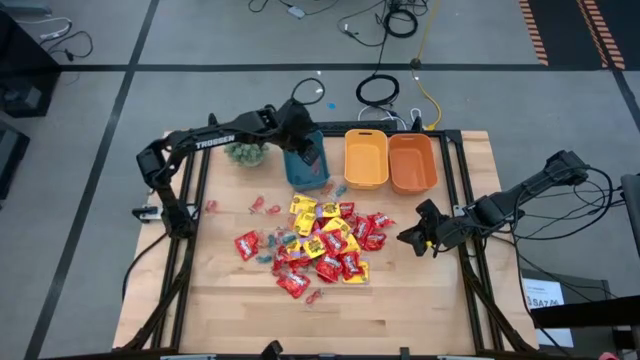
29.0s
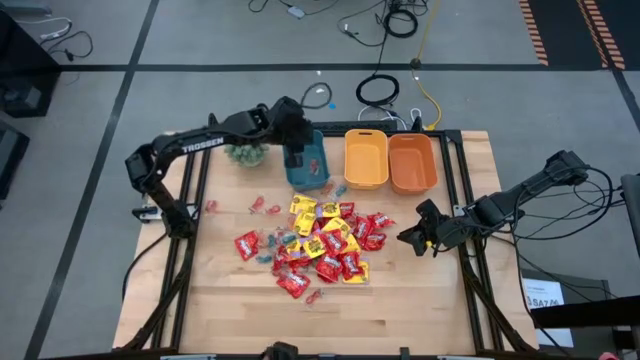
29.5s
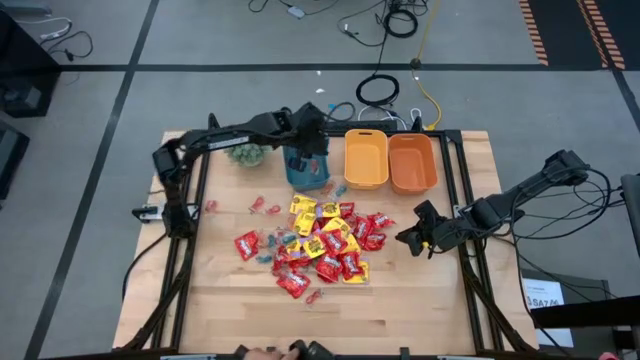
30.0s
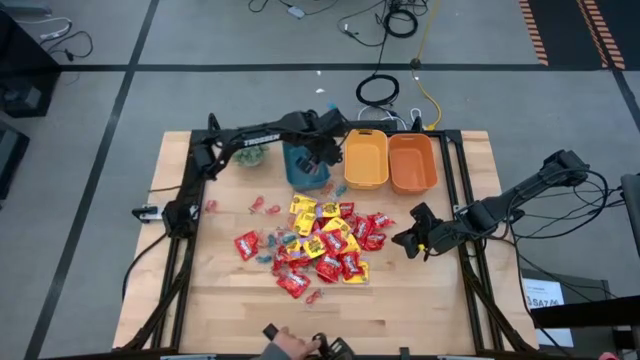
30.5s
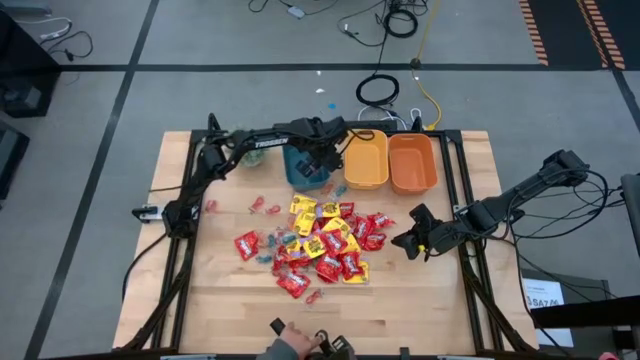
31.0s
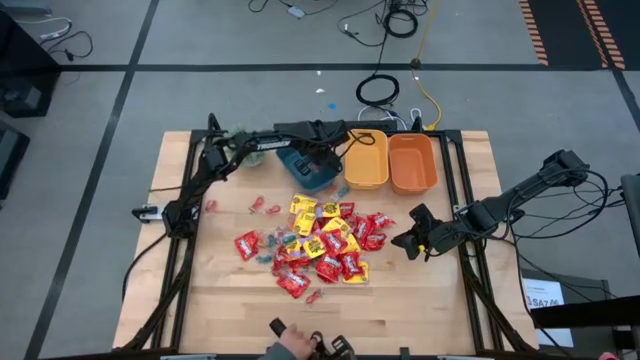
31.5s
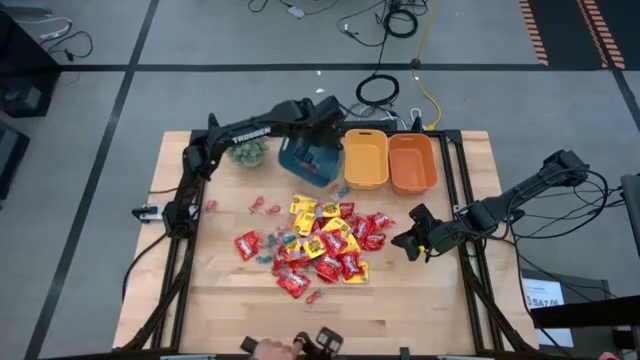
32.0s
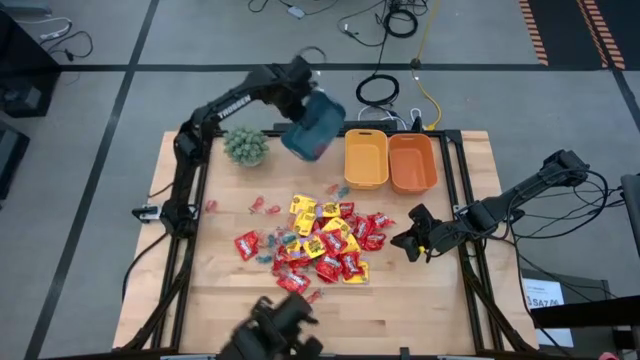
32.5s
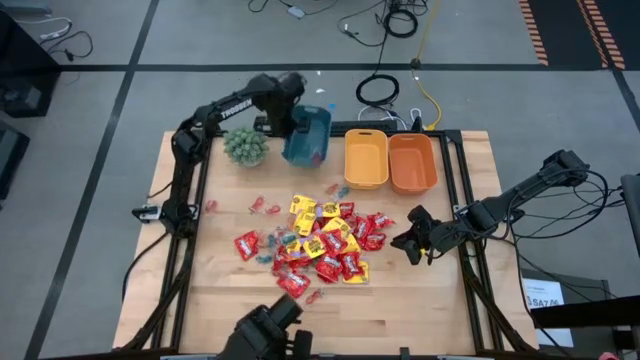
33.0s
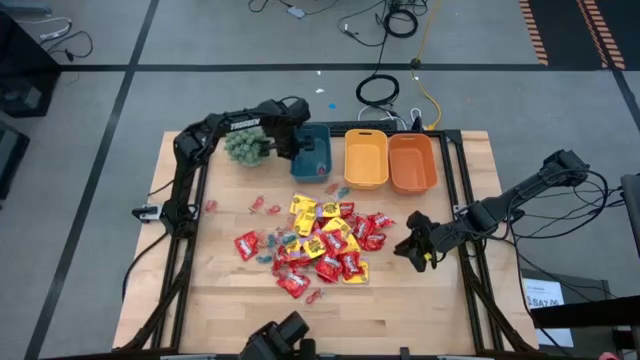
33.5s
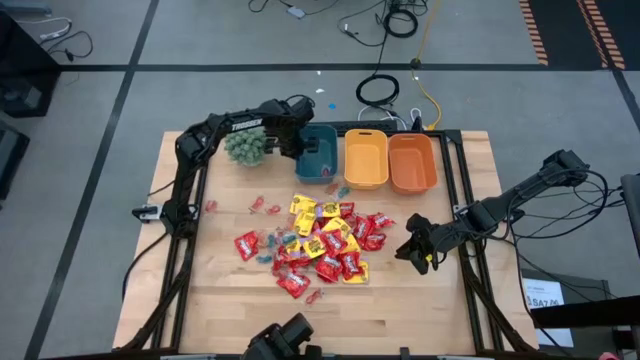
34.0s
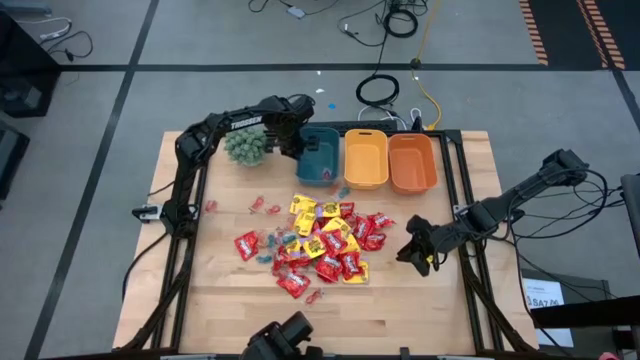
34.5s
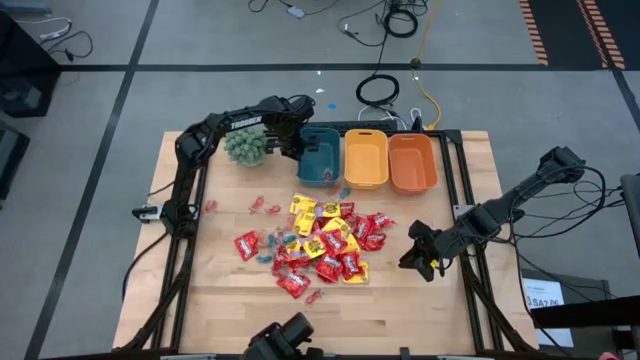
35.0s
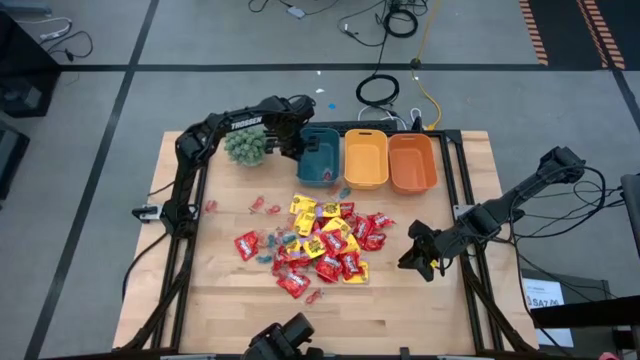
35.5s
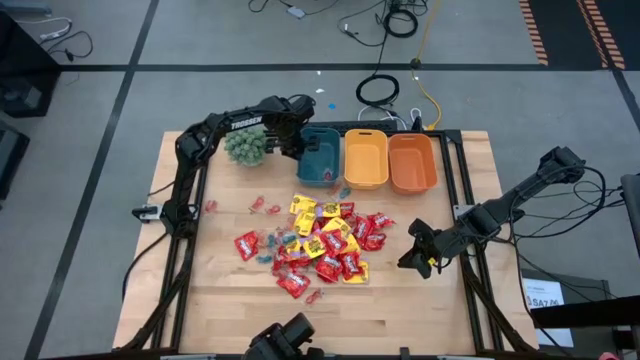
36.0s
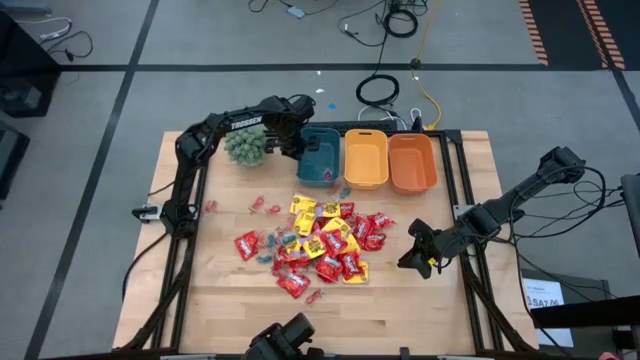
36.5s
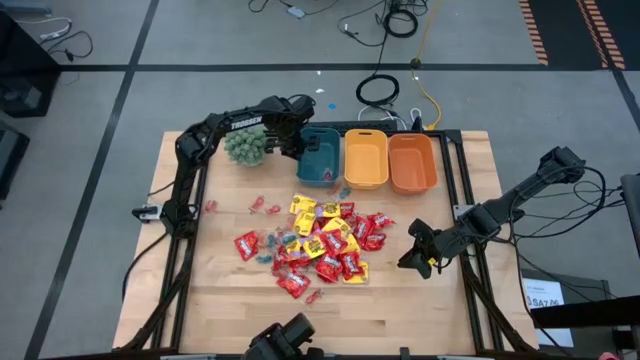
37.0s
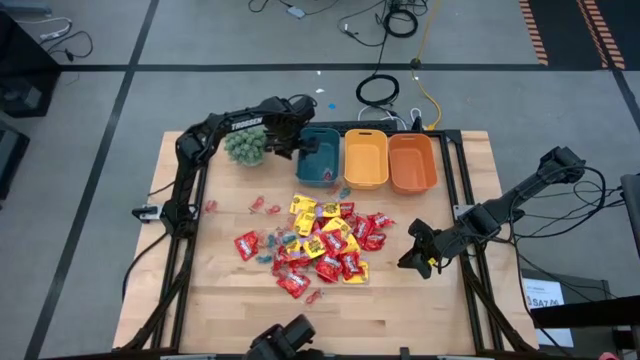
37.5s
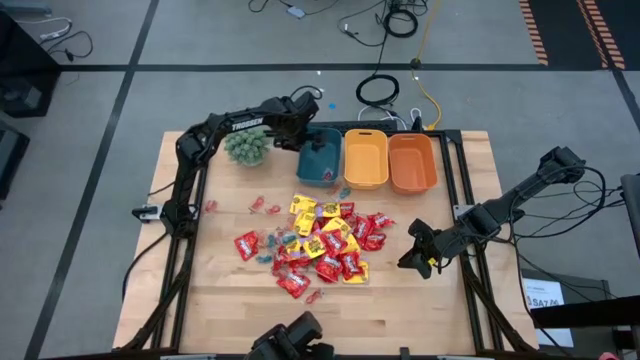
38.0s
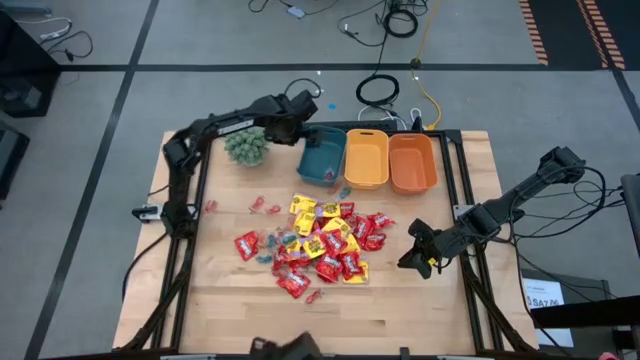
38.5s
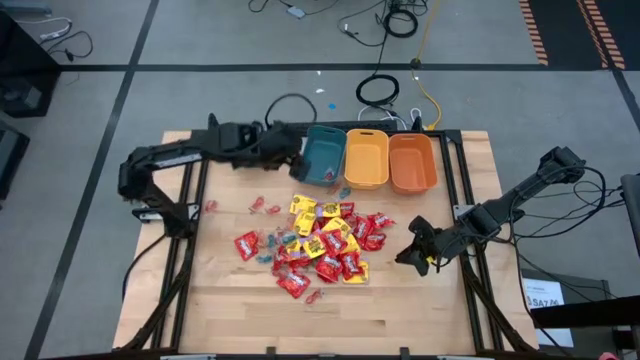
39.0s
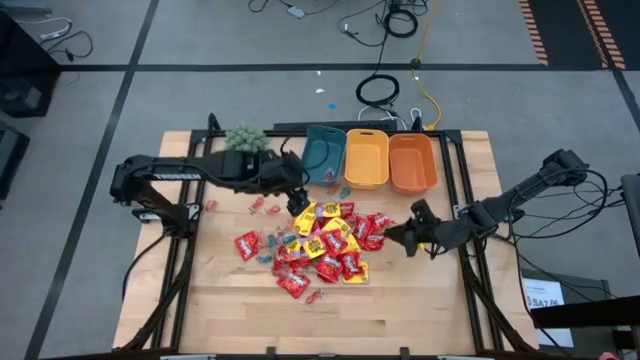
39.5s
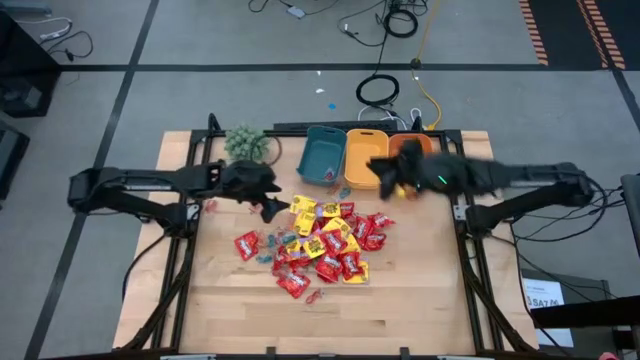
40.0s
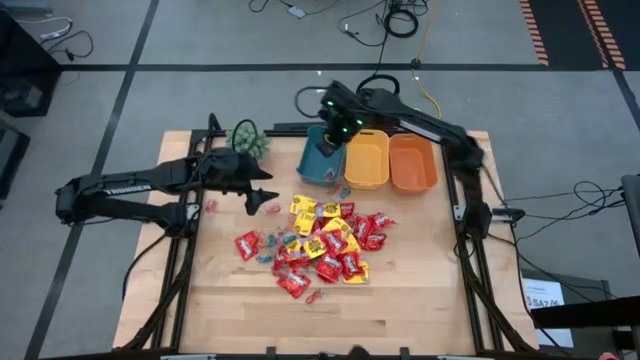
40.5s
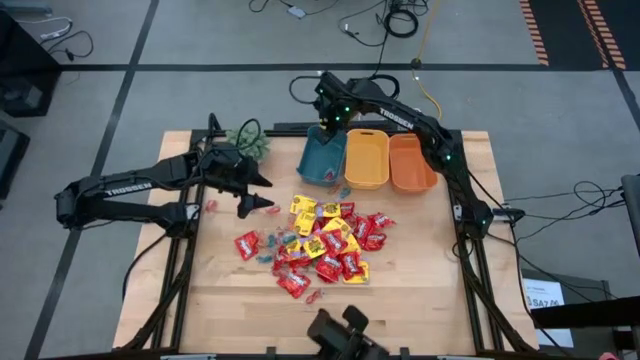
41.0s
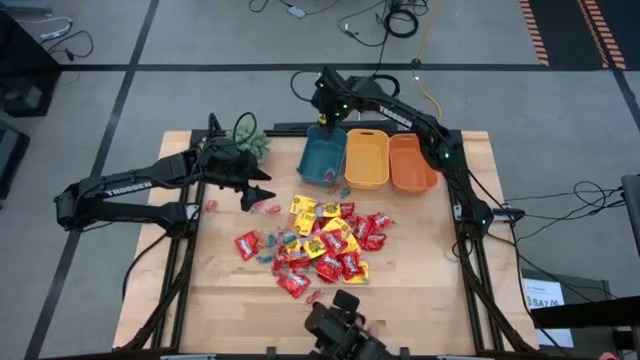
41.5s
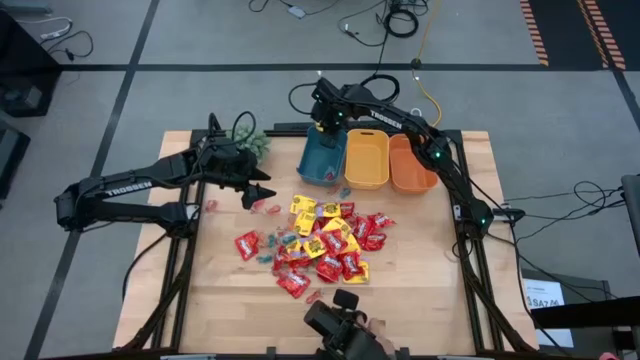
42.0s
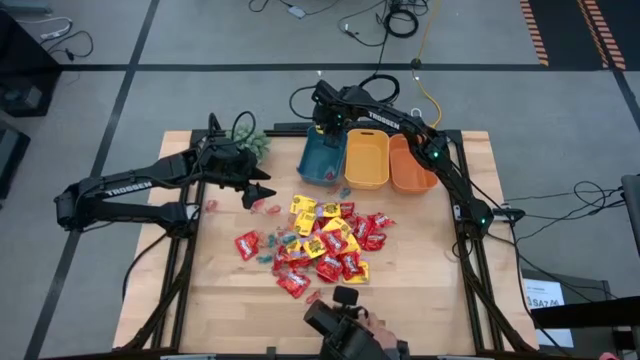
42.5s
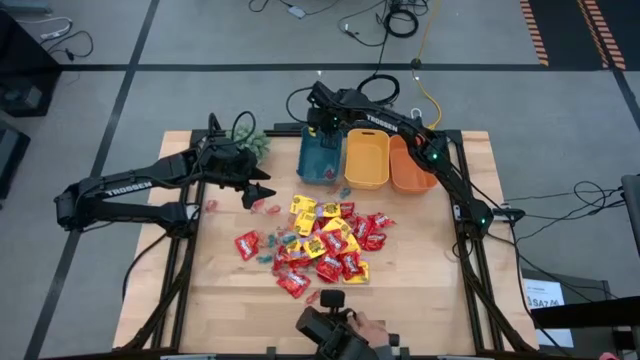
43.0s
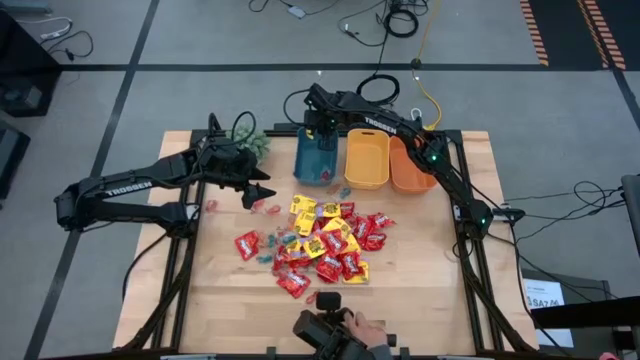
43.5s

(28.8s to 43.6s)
Task: Sort candy
Adjust the blue bin

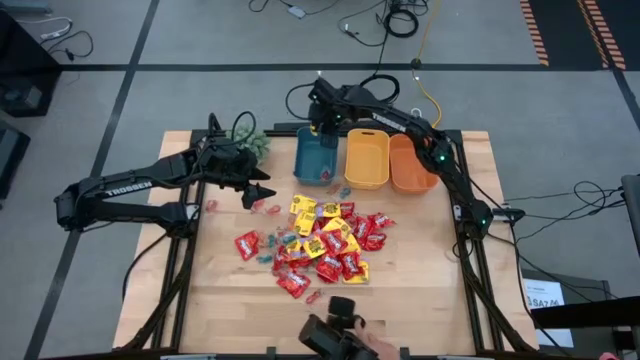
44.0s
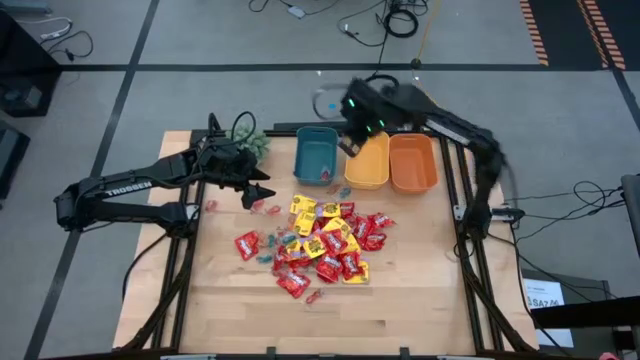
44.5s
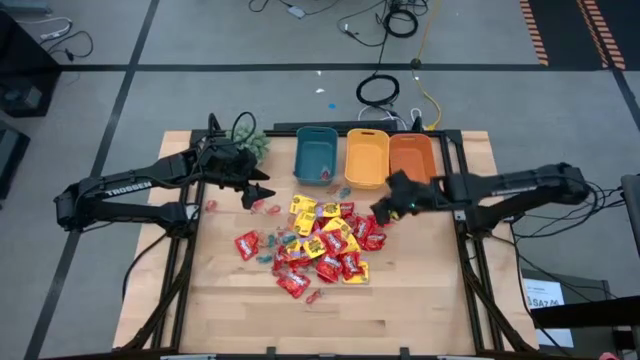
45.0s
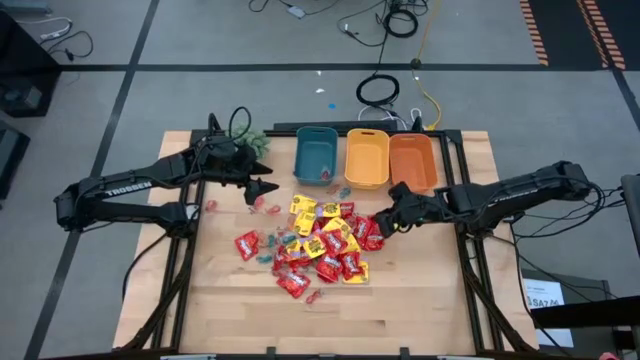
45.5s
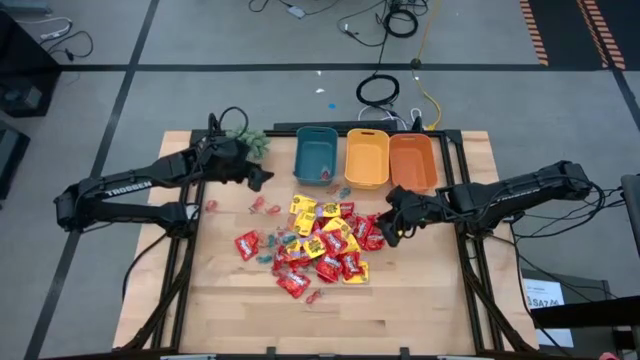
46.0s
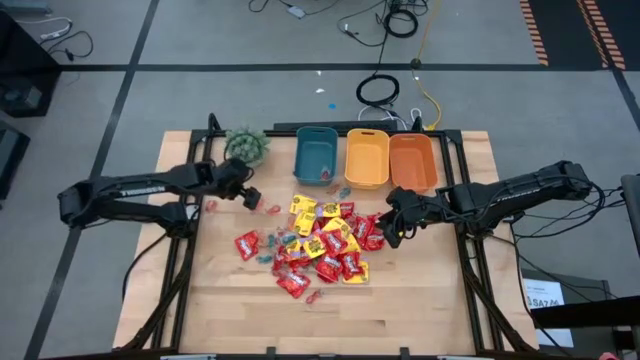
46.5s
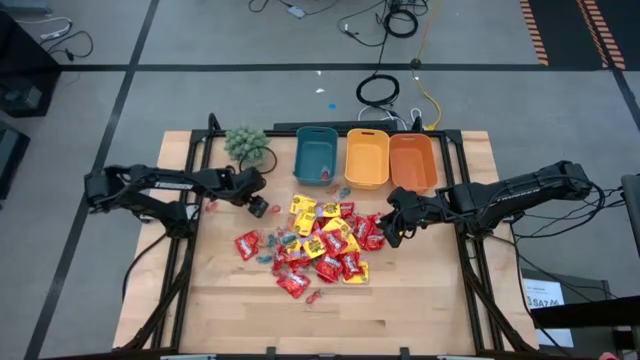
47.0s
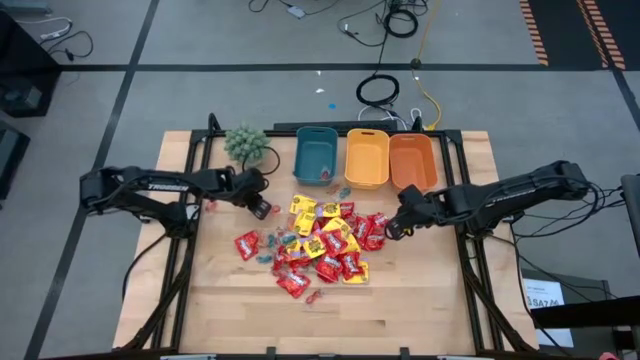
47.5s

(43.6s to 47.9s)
Put the orange gummy into the blue bin

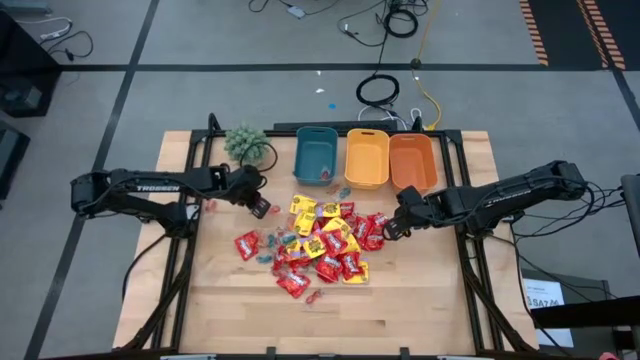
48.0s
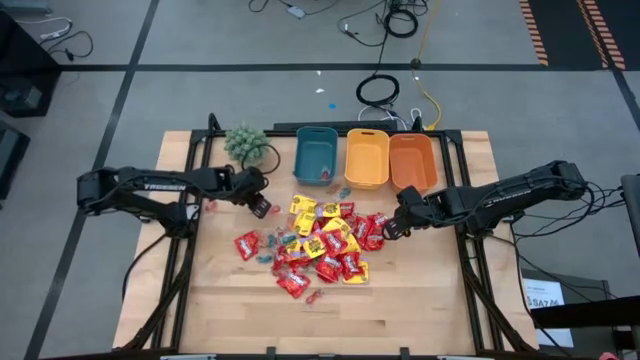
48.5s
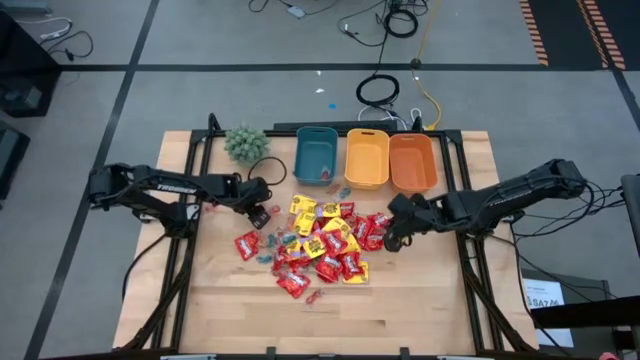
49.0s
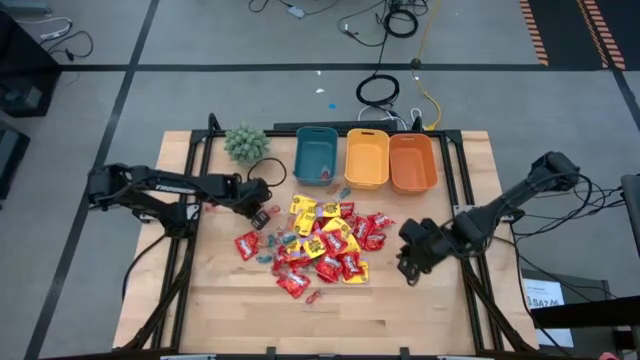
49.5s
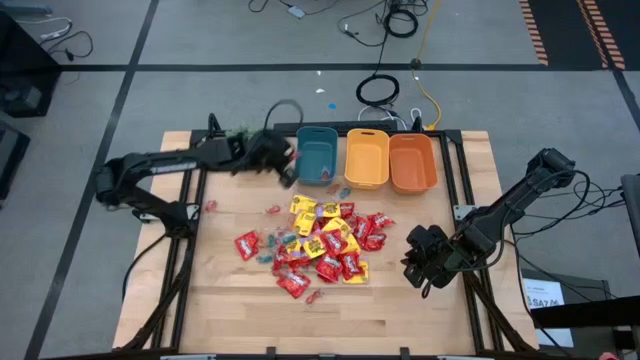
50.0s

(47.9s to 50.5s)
Put the orange gummy into the blue bin
